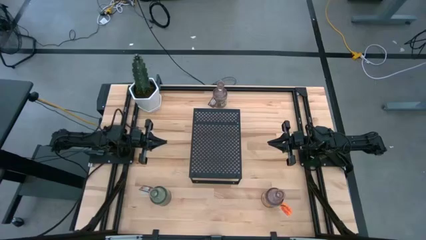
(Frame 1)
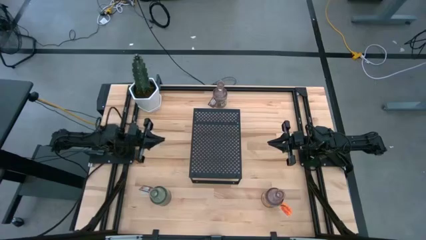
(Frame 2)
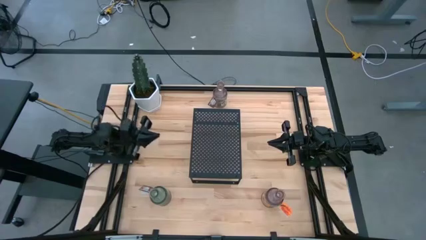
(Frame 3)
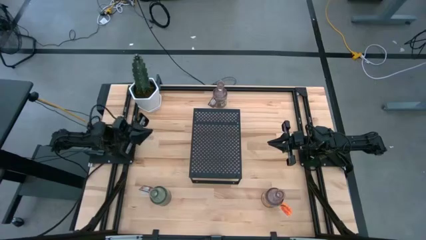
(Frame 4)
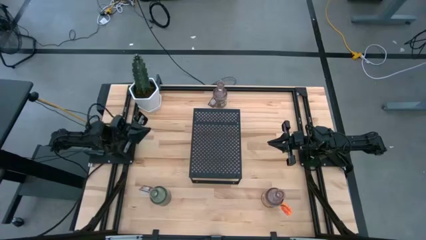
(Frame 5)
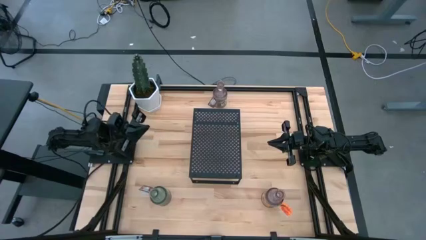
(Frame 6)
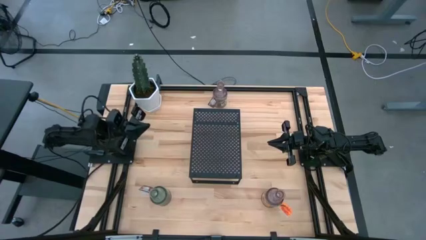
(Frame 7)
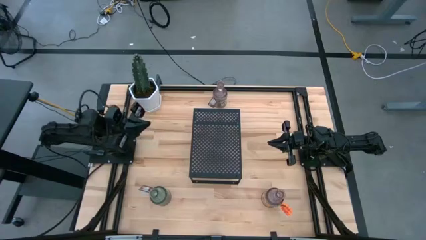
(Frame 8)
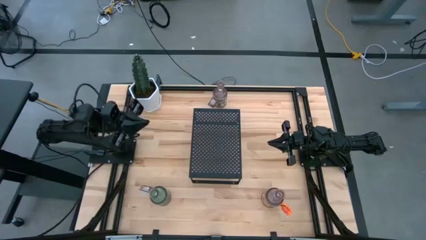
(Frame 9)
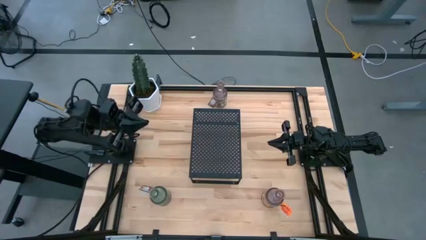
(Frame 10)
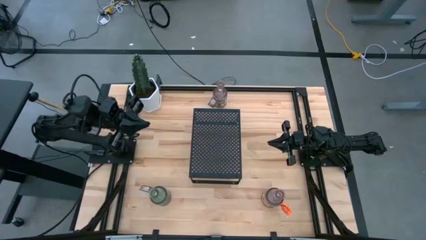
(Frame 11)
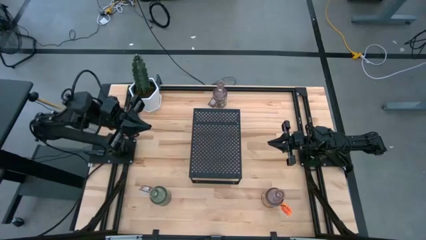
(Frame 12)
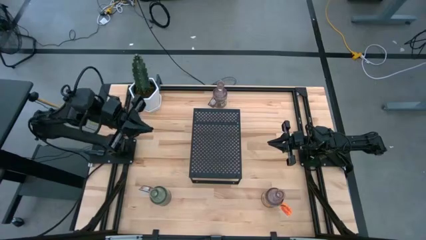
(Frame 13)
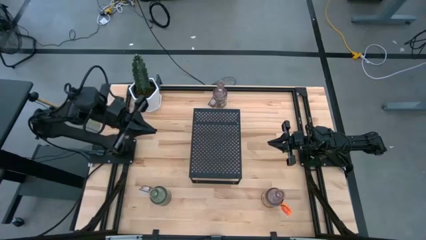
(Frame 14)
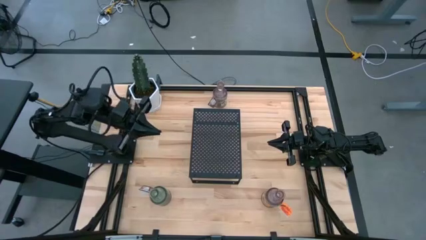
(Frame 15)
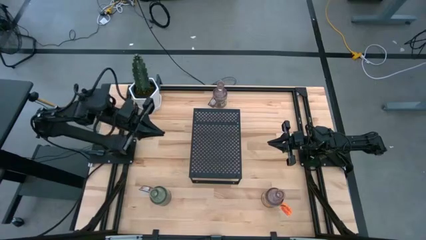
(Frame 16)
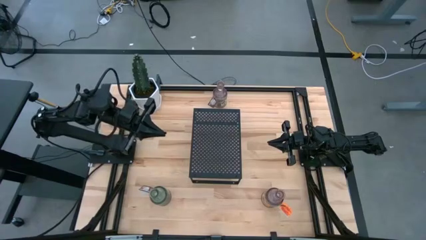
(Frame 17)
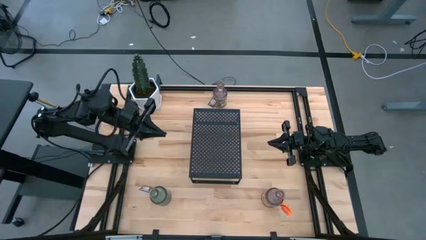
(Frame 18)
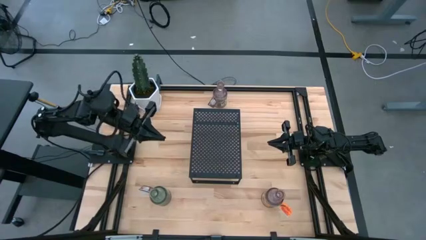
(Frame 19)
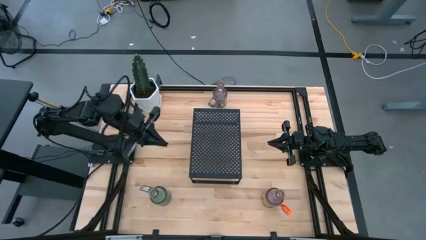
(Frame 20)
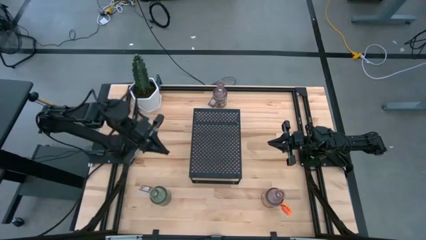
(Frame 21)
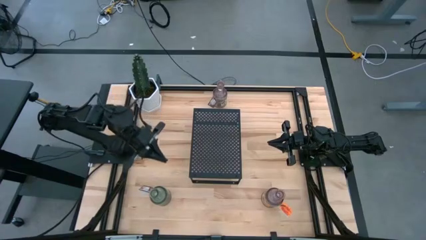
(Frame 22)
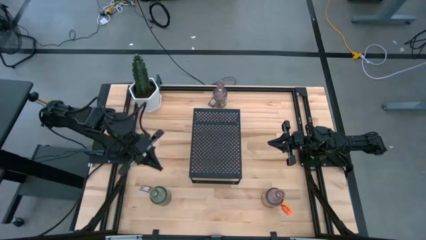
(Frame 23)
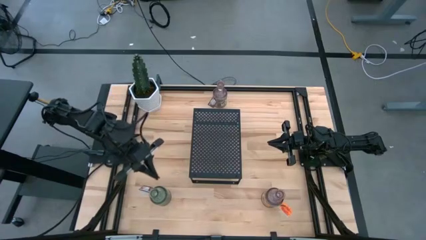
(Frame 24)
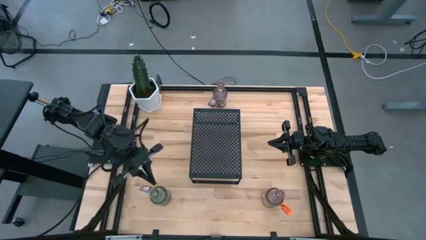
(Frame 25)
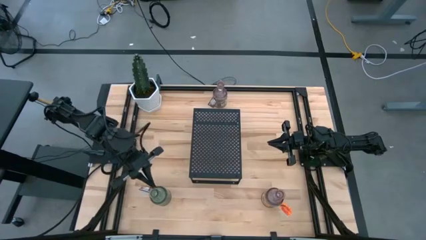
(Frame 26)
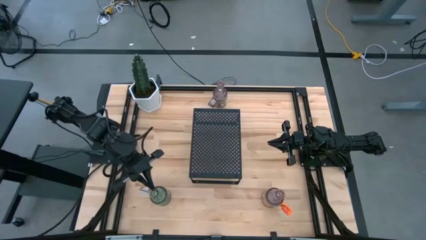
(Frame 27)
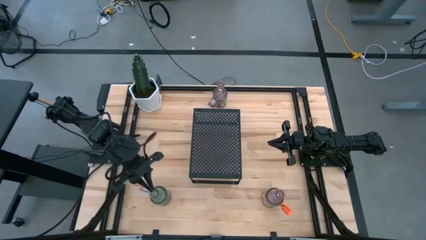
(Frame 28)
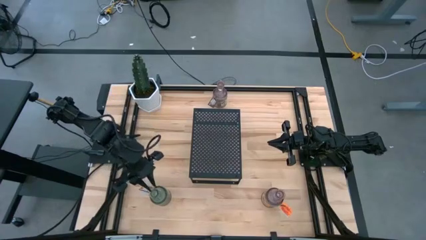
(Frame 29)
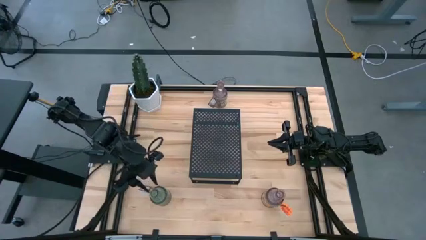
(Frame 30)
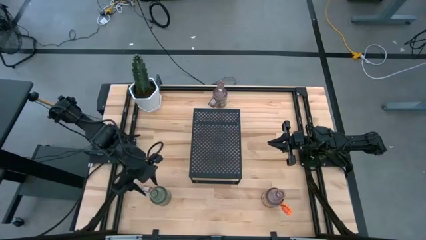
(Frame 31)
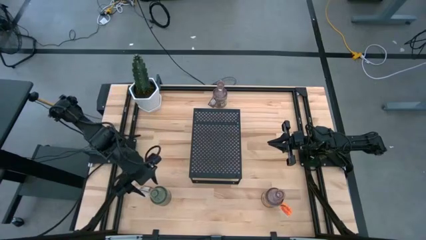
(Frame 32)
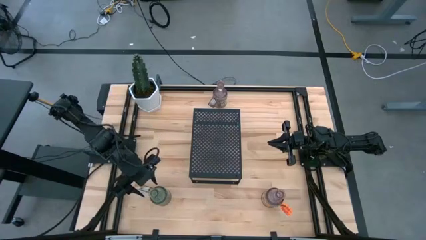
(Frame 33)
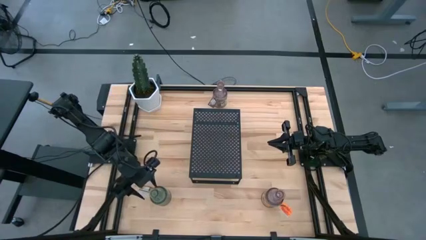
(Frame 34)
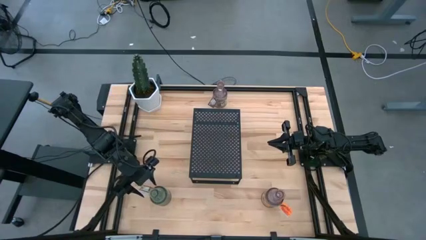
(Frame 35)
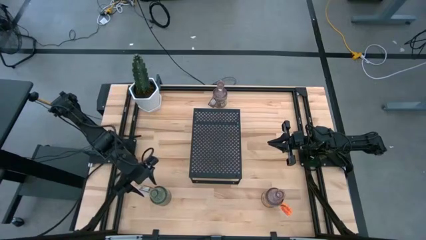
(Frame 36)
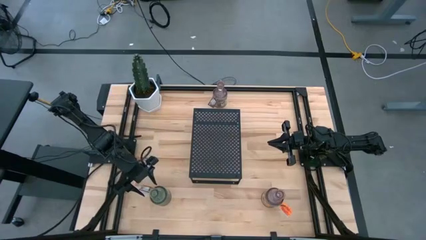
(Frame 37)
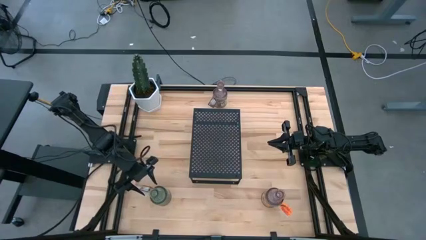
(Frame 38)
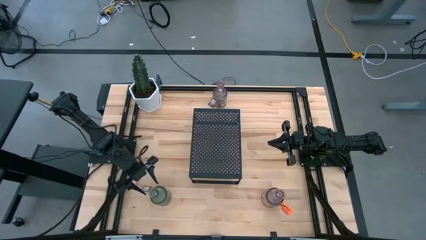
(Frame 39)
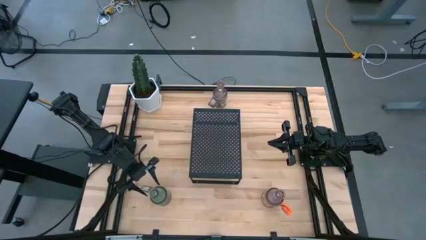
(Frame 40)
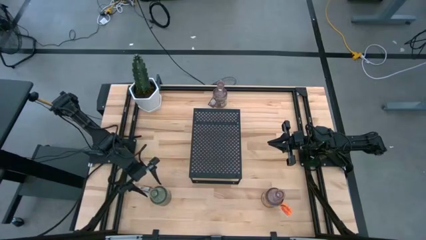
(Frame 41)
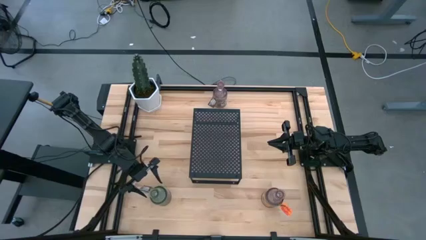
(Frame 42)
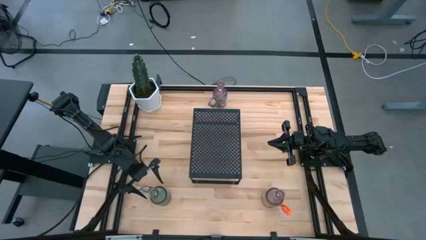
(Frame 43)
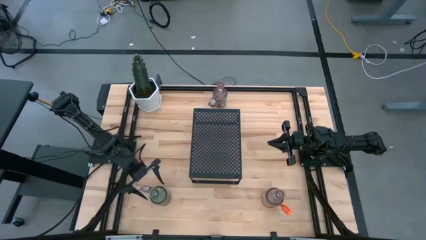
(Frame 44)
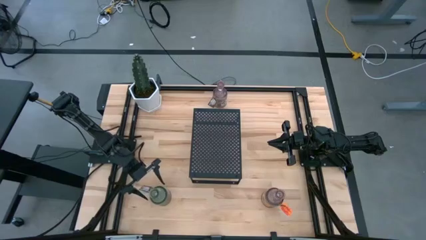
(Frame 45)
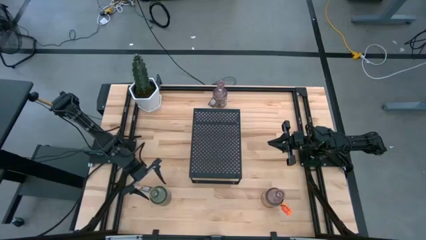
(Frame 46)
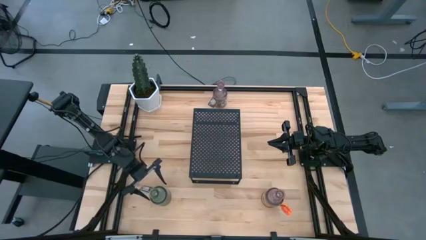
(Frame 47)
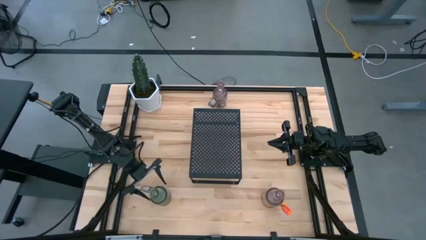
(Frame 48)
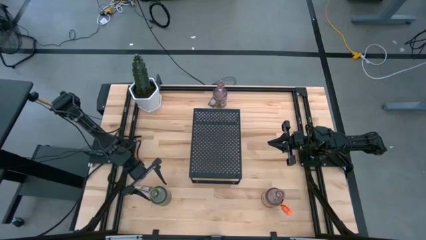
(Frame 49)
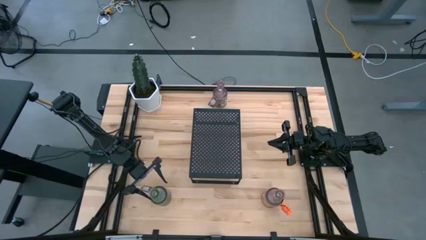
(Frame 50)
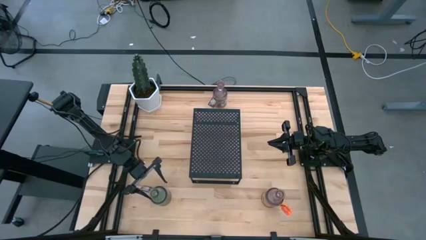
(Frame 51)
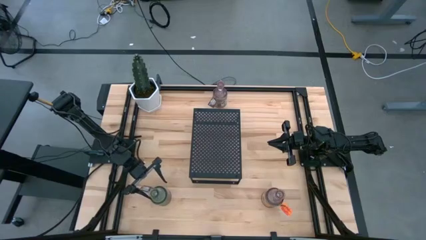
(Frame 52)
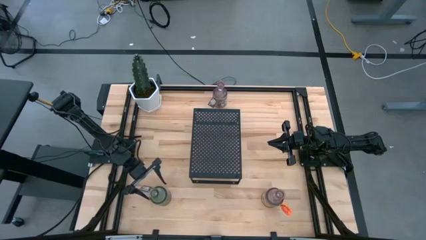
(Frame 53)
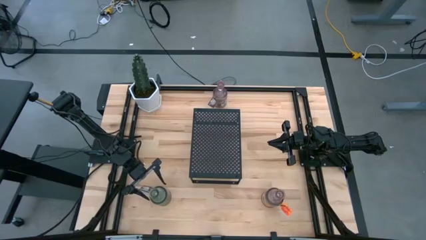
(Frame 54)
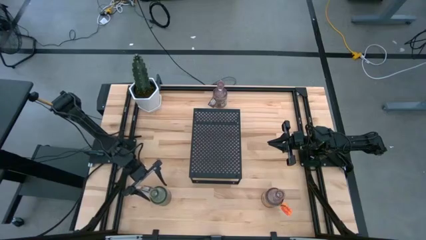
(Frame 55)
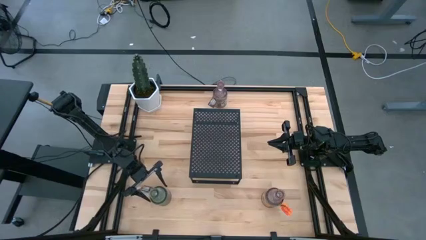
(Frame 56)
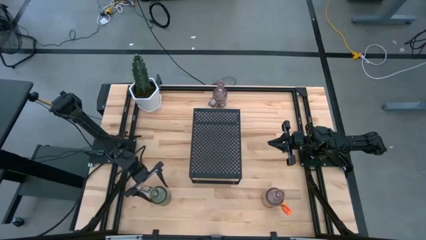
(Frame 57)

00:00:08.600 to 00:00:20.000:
Task: Pick & Place candle stick holders
Put the green candle vase on the shelf

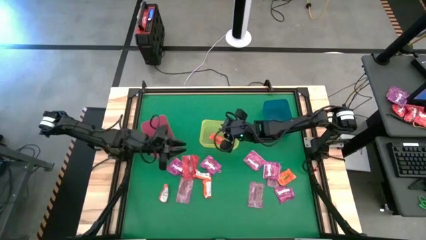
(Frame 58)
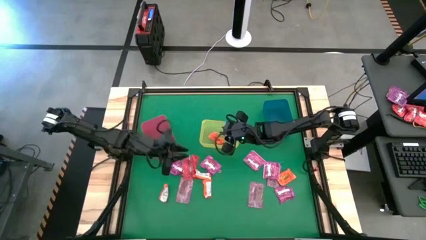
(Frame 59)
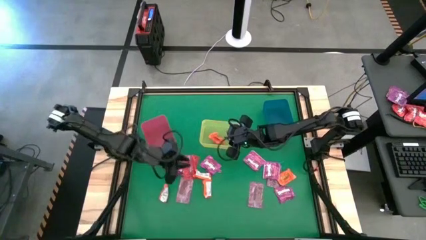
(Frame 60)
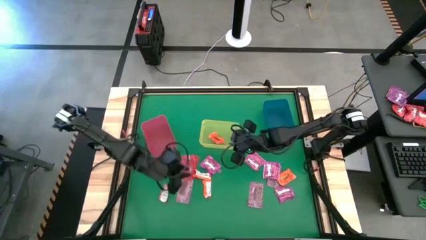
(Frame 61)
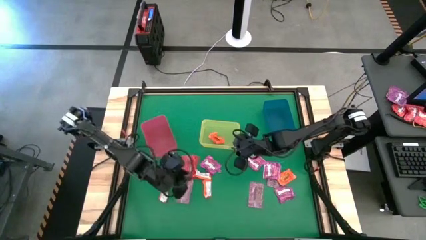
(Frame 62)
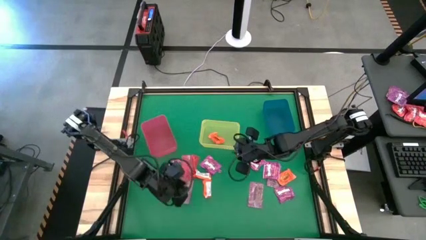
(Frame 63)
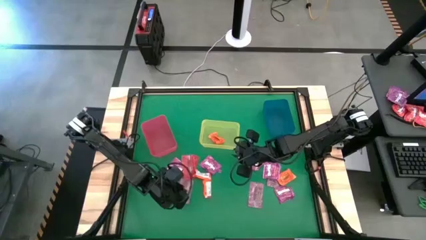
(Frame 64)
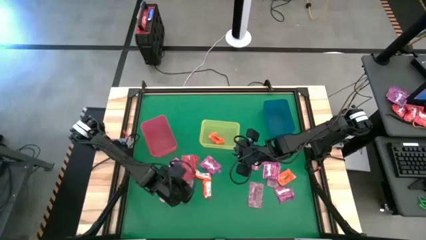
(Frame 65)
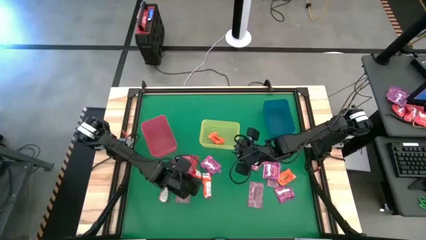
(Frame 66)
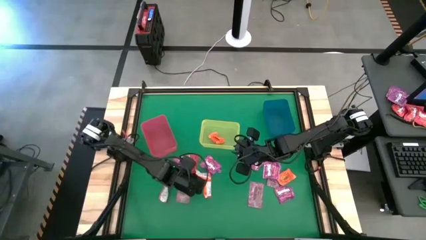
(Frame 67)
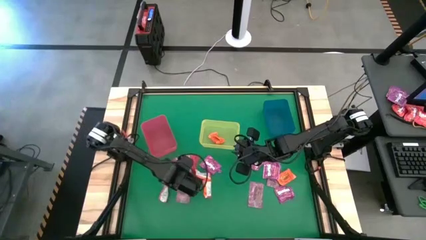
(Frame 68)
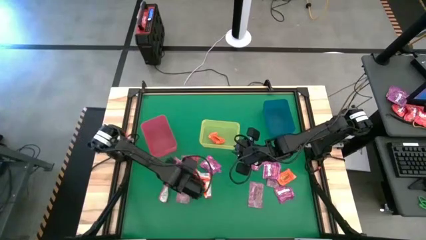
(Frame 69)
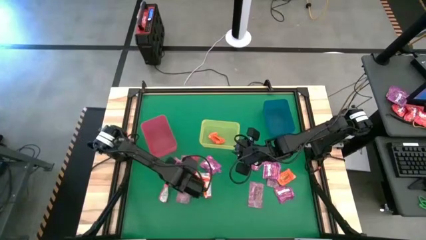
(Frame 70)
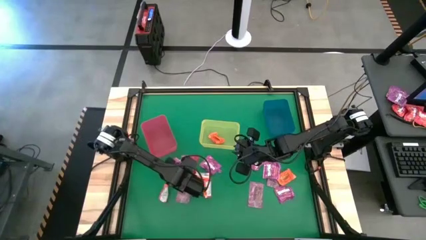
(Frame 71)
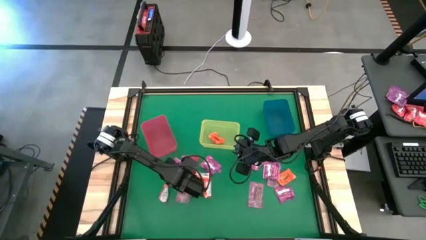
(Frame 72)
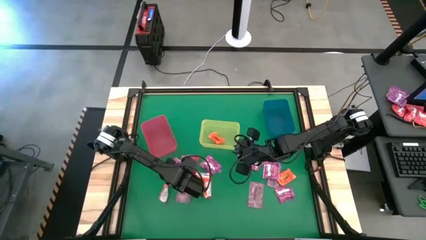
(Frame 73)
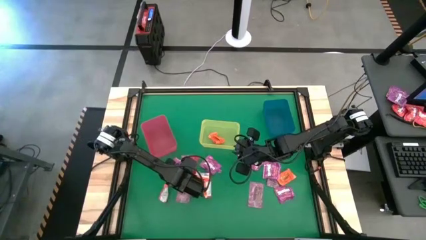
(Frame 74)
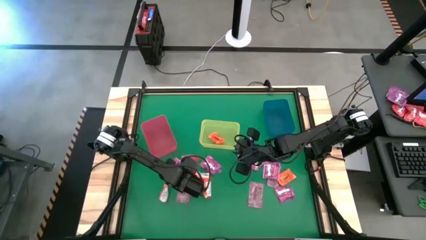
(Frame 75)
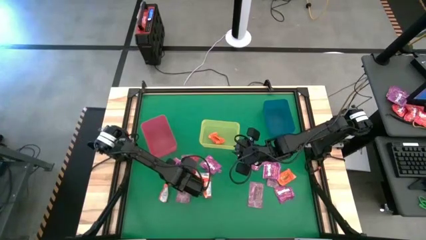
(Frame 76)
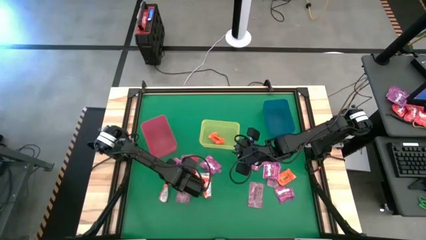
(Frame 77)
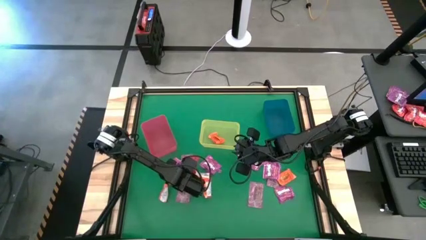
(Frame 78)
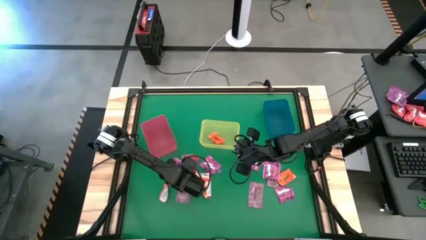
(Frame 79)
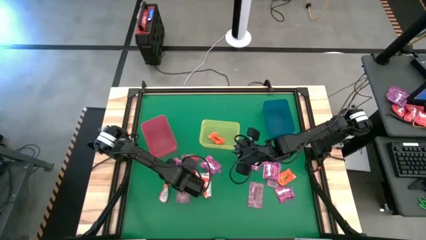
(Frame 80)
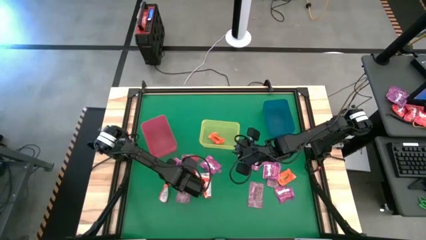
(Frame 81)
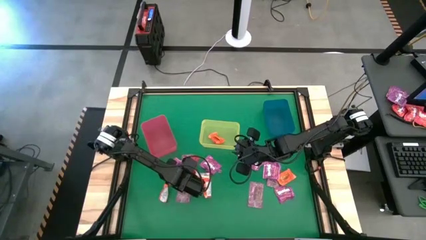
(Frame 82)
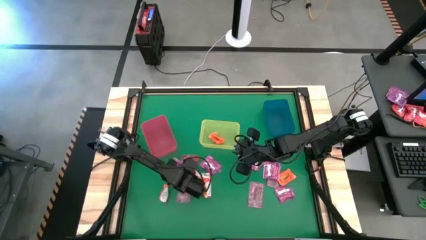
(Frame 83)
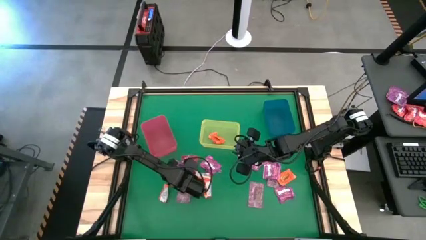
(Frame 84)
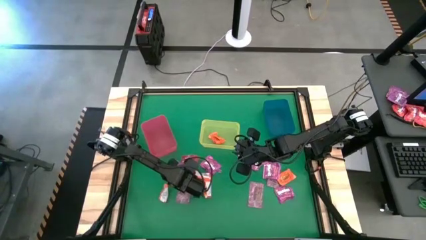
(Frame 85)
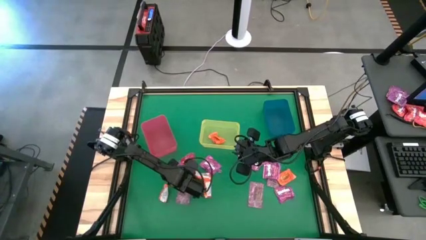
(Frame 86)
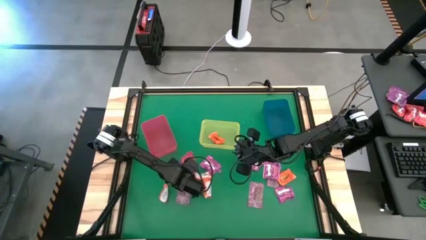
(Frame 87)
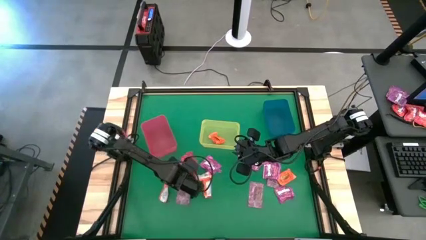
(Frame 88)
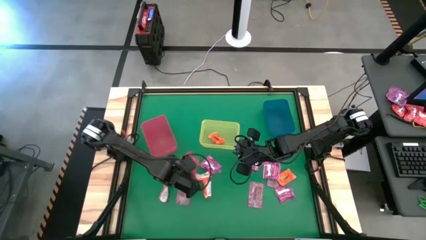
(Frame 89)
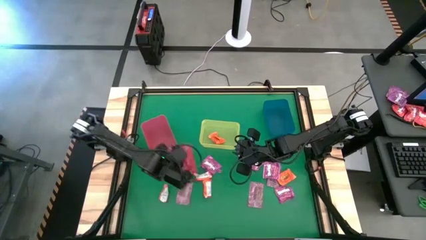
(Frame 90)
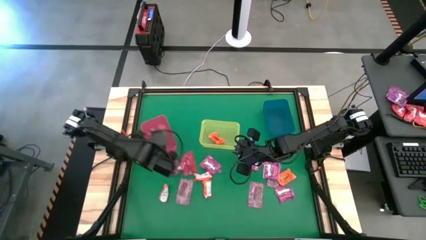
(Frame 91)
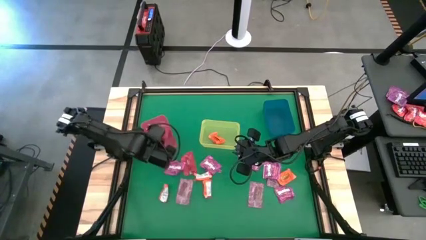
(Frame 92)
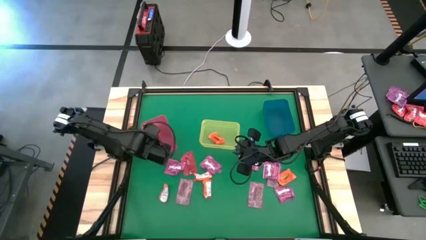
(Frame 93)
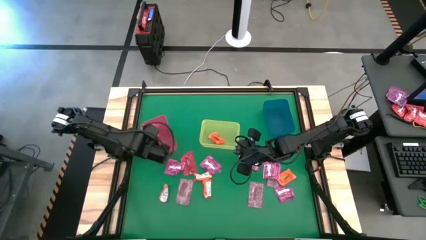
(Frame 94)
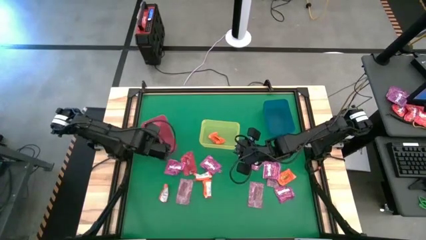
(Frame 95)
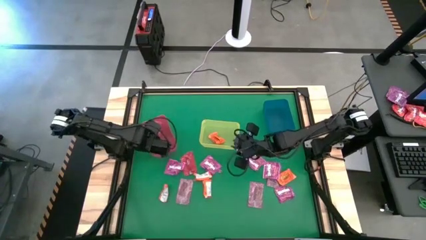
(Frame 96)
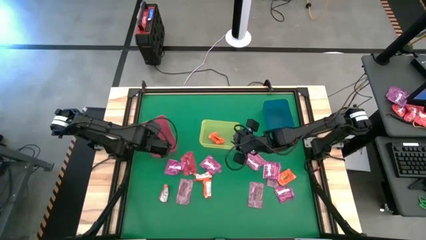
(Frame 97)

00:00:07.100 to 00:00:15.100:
Task: Sort candy by brand, put in halloween buckets
Put the red candy into the red bin
